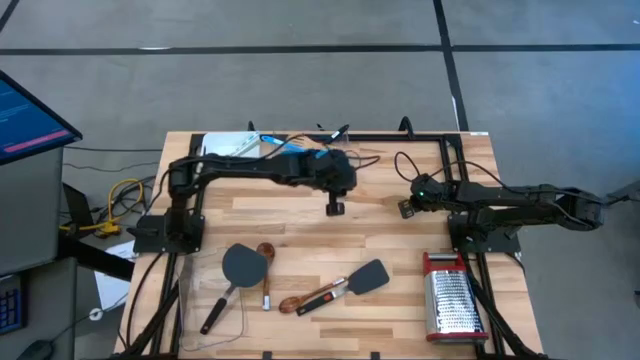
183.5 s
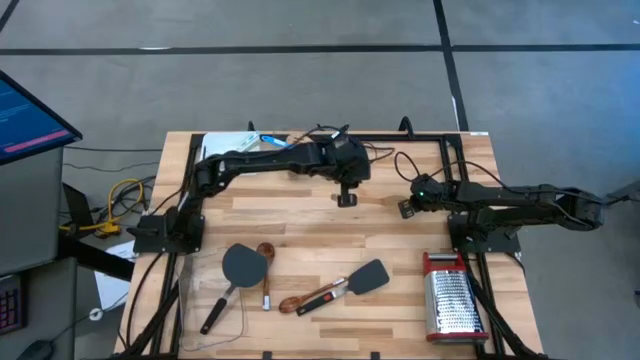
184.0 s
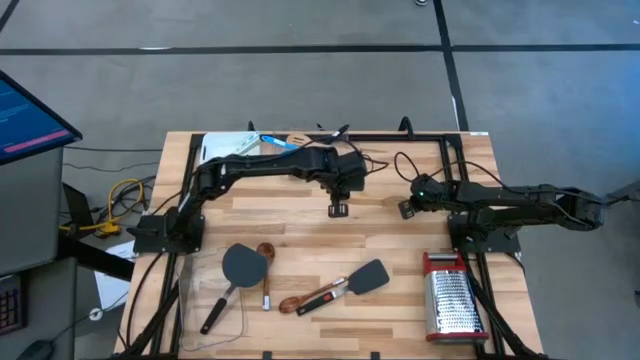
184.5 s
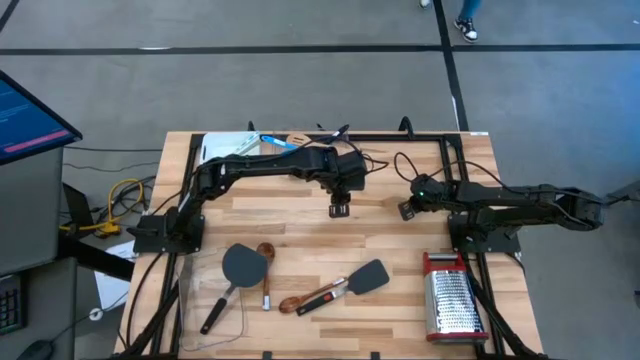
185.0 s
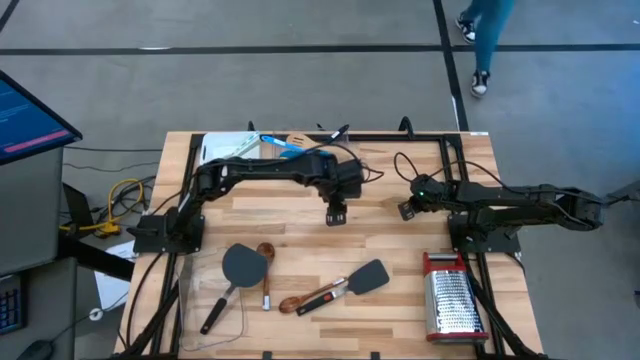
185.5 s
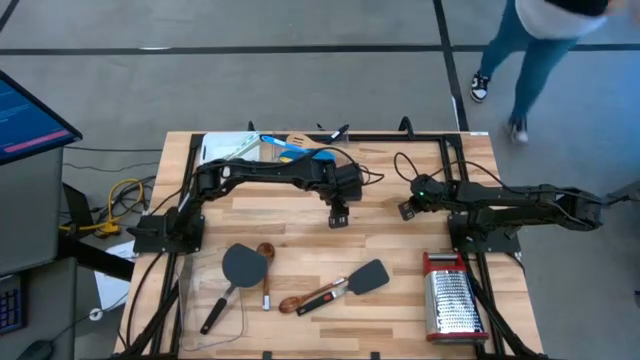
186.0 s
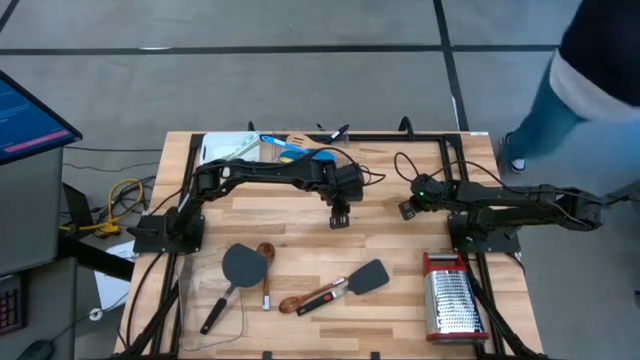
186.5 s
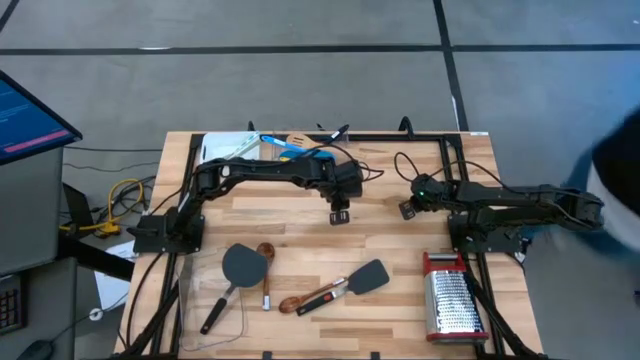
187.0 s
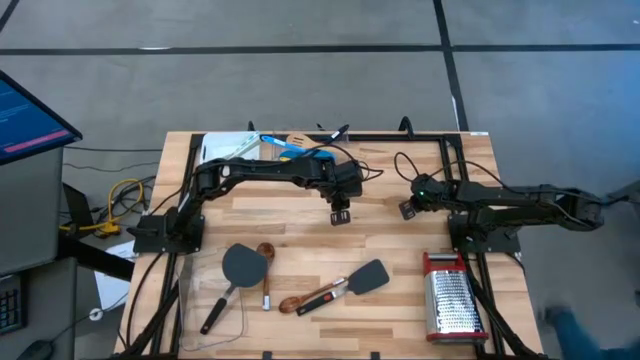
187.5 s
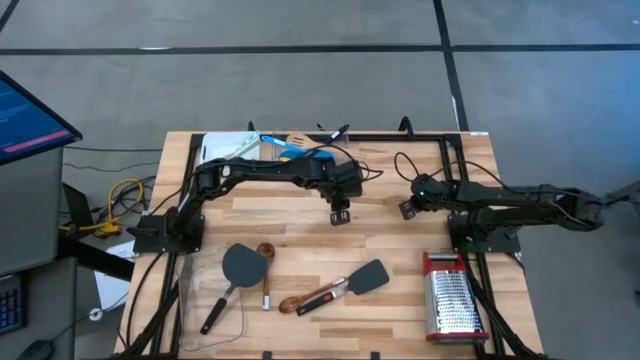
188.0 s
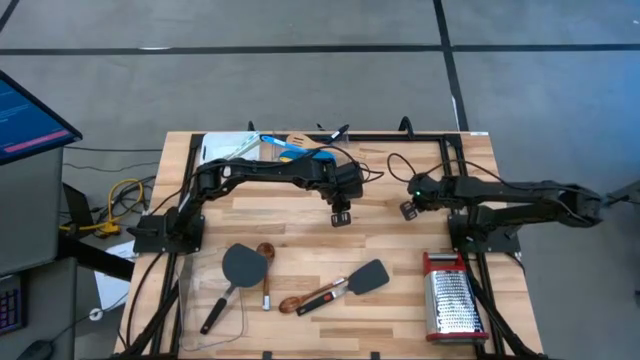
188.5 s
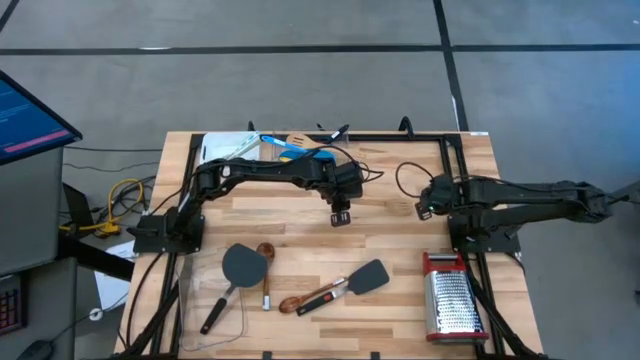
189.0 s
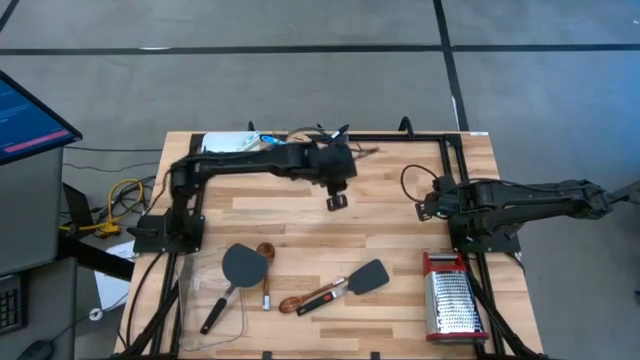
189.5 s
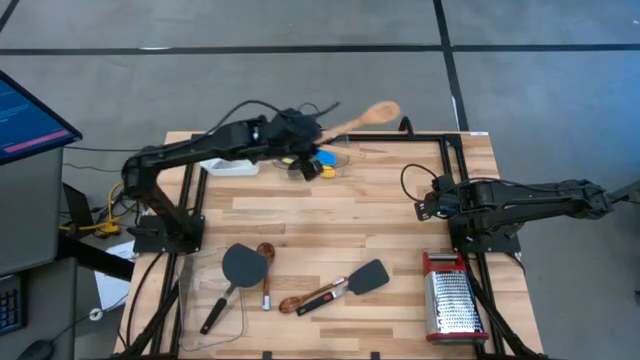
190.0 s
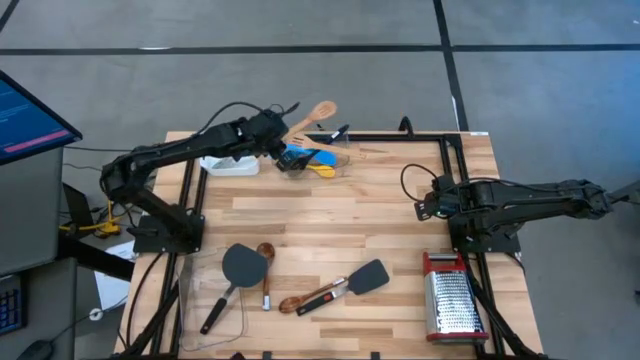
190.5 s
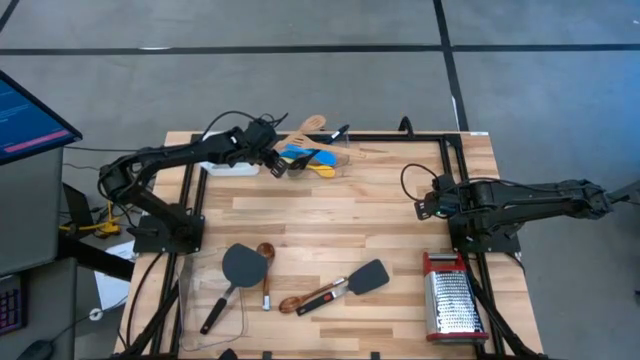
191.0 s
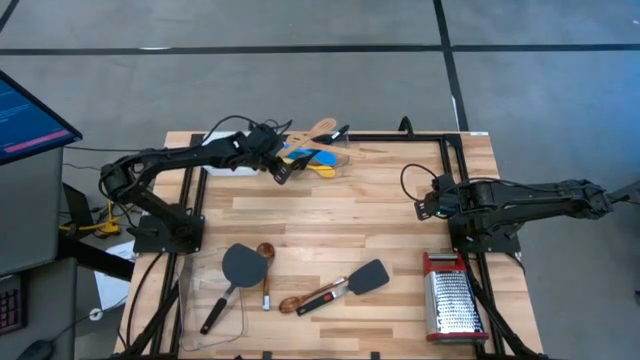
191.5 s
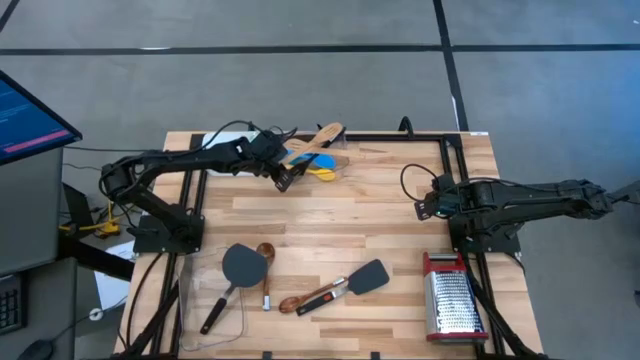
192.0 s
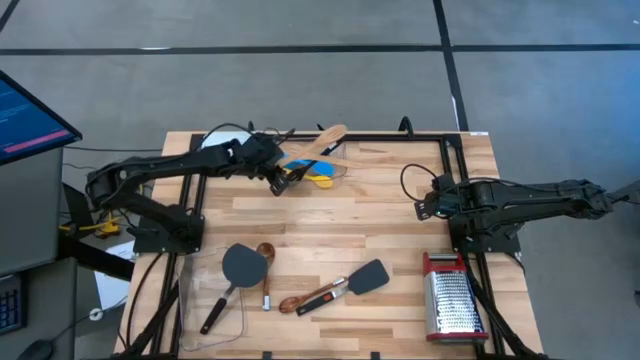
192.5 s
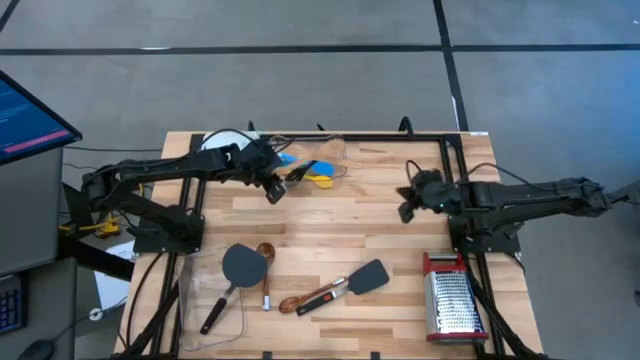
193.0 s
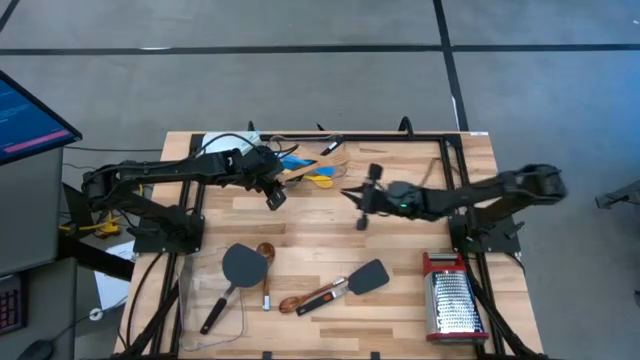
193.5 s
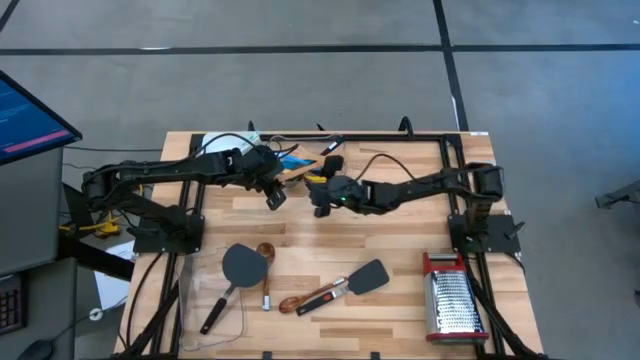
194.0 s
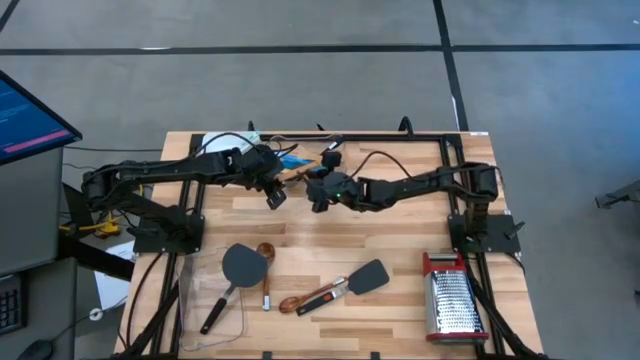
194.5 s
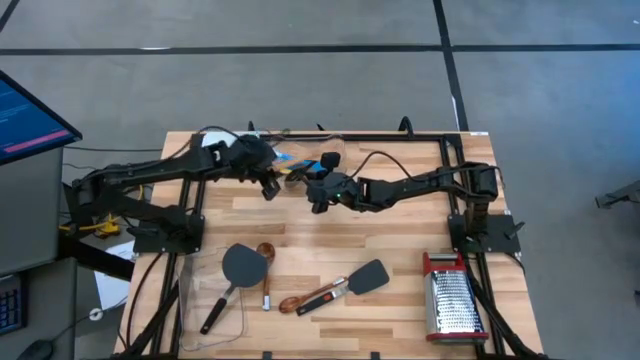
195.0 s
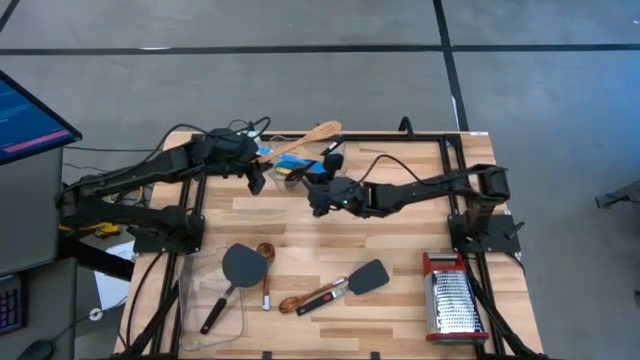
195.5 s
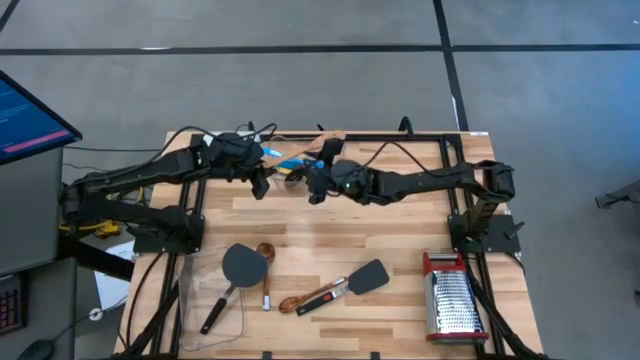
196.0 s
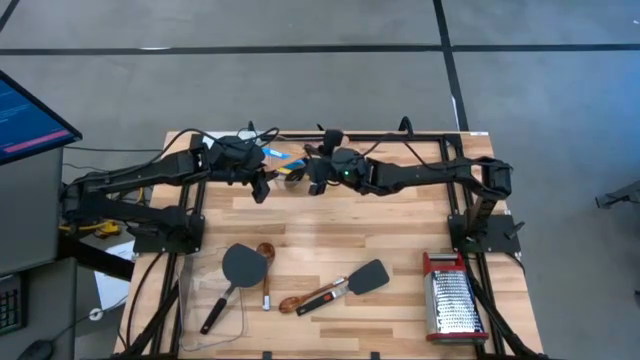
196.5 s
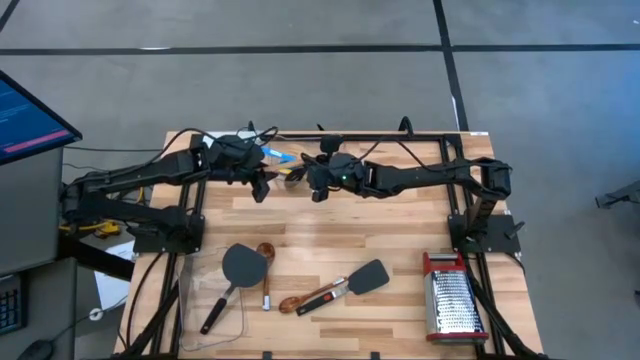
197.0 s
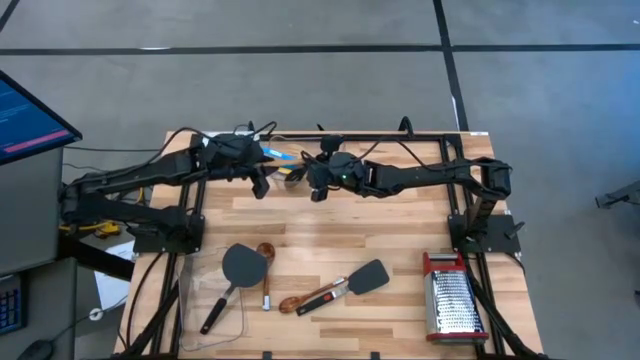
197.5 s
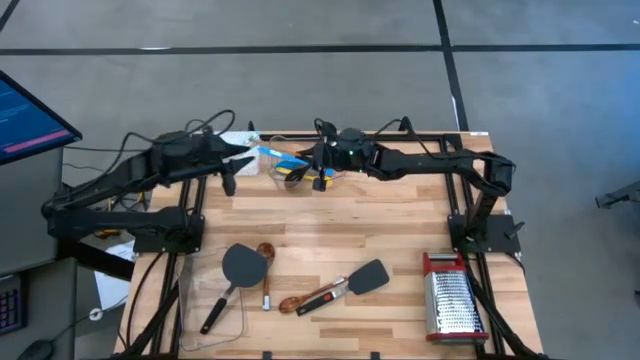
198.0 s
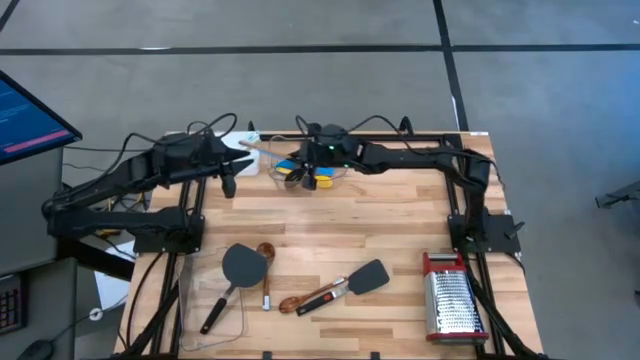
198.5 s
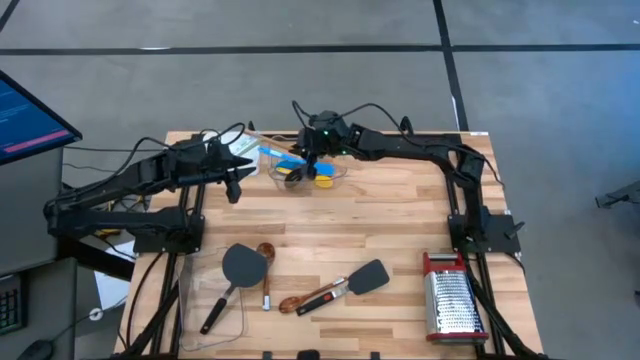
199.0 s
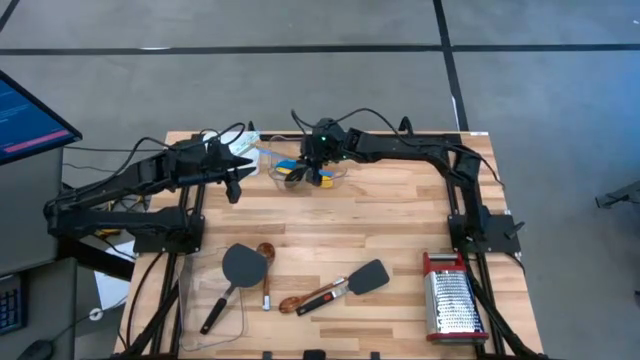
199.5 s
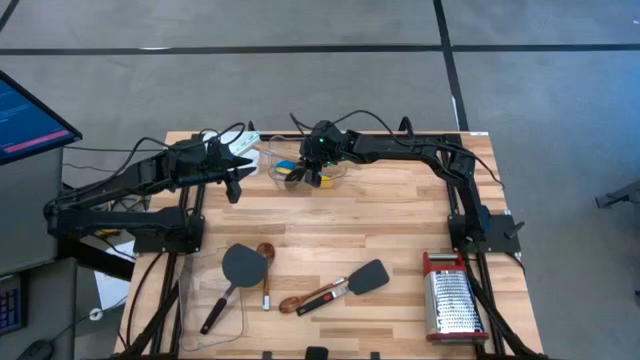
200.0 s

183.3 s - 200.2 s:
Task: Pick & Place Kitchen Items
Put the brown slotted spoon into the top transparent bin

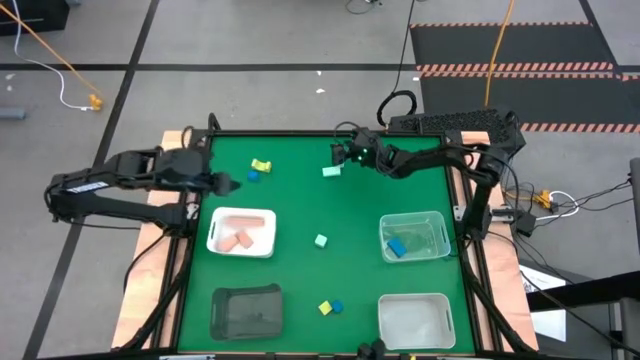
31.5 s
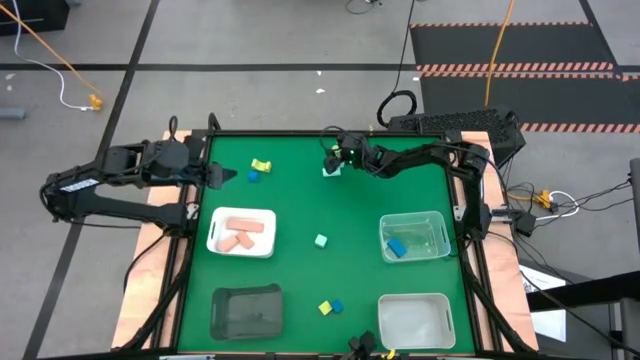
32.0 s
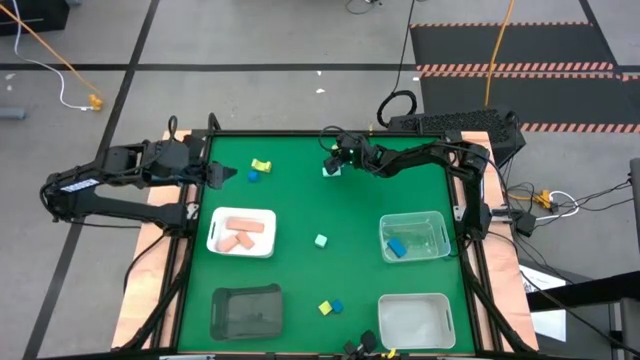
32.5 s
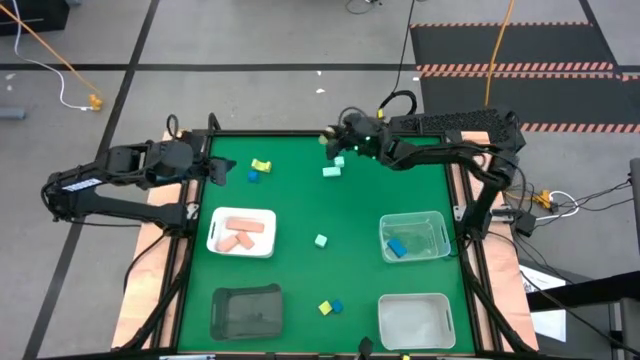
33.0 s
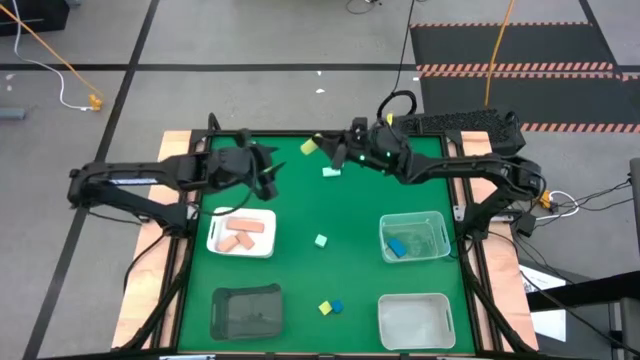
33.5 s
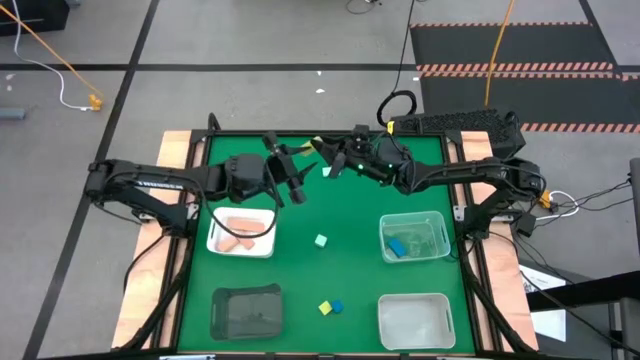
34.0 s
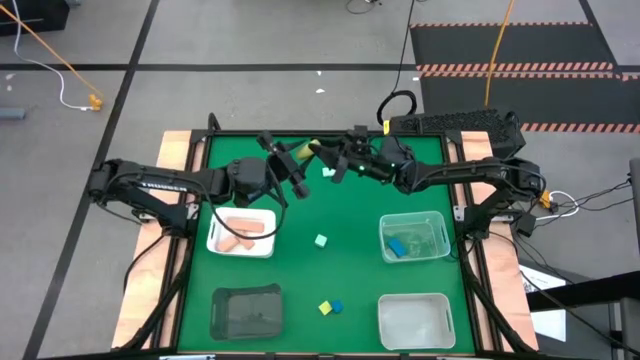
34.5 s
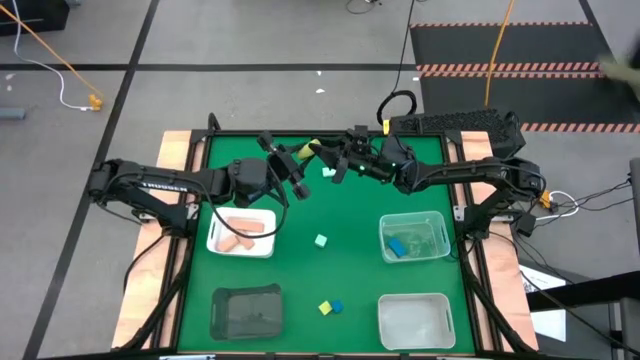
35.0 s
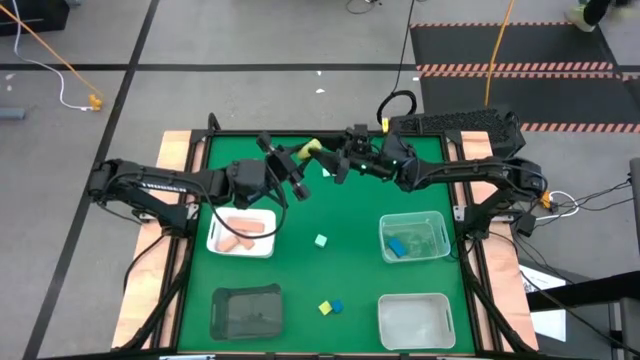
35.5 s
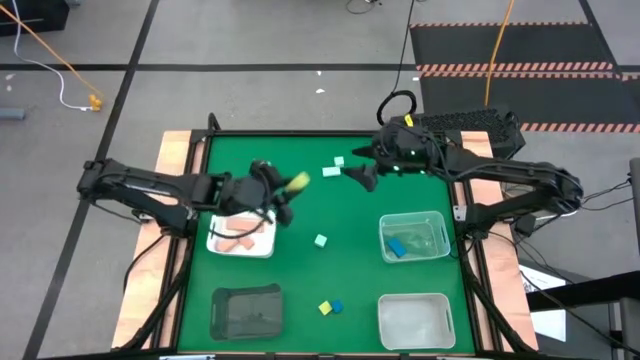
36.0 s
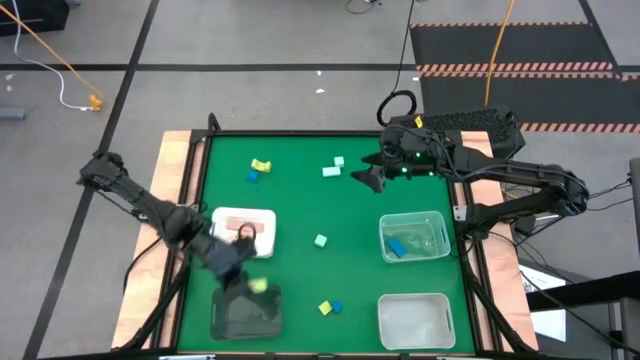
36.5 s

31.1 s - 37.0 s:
Task: Sort & place blocks by color
Put the top center green block into the black bin
